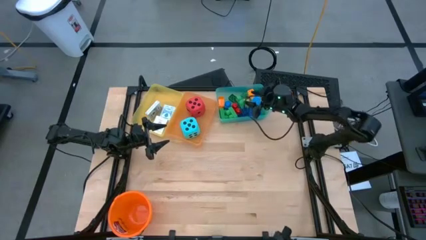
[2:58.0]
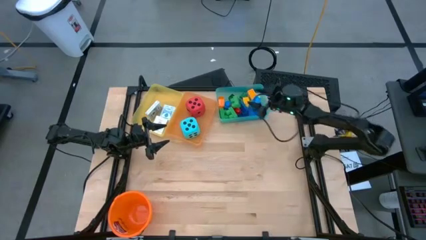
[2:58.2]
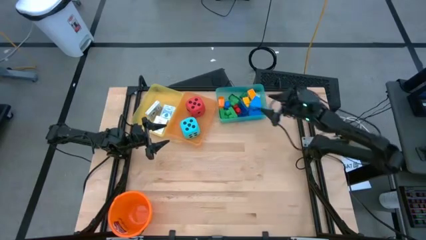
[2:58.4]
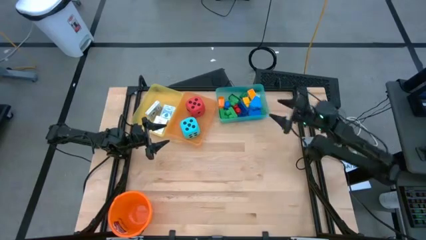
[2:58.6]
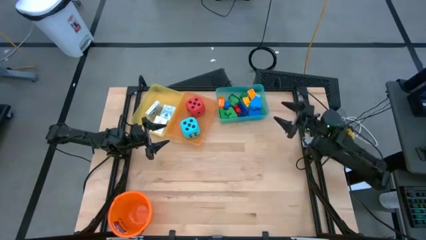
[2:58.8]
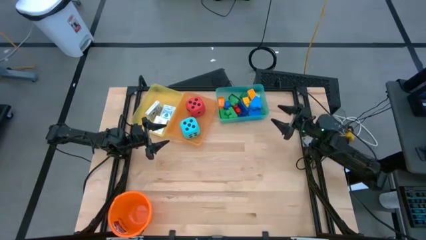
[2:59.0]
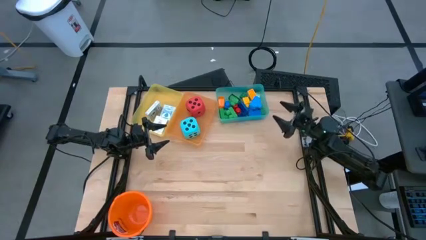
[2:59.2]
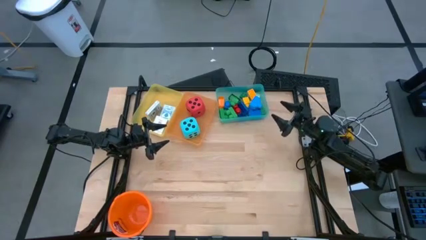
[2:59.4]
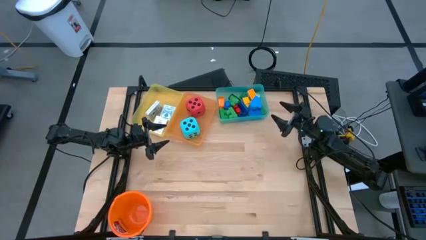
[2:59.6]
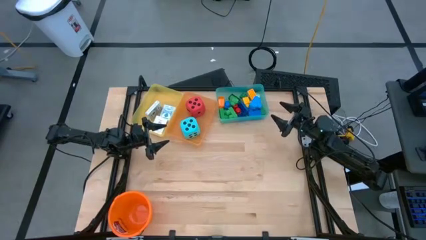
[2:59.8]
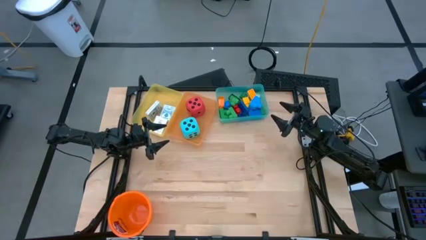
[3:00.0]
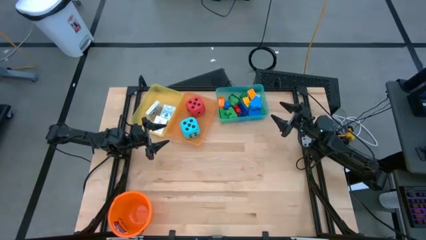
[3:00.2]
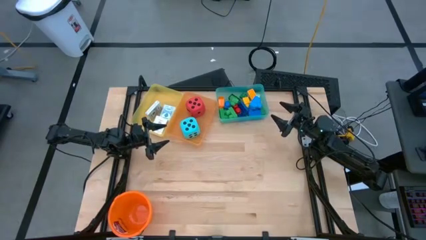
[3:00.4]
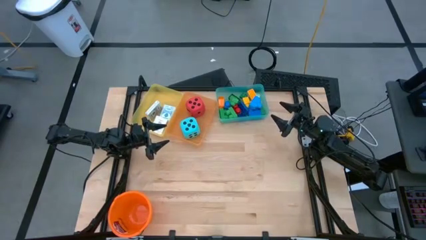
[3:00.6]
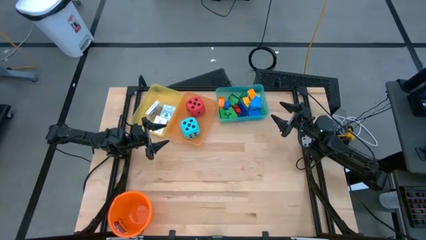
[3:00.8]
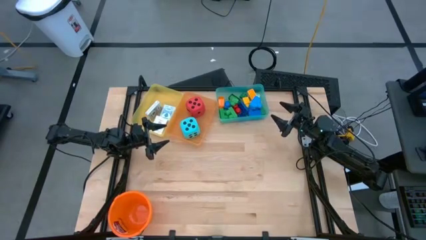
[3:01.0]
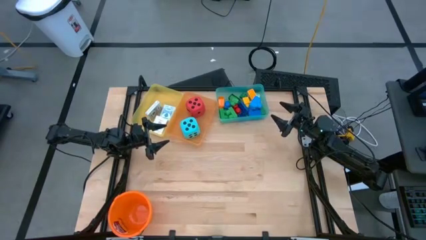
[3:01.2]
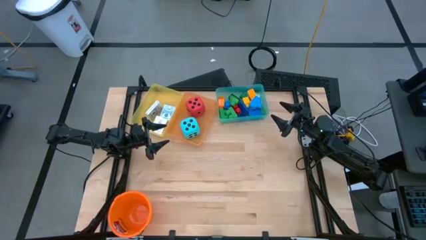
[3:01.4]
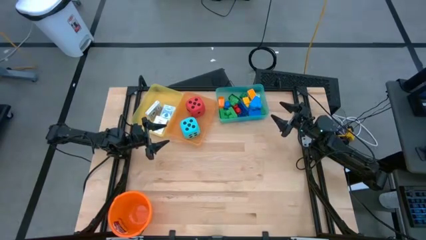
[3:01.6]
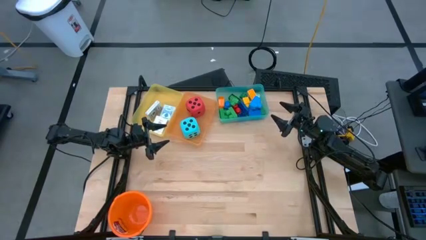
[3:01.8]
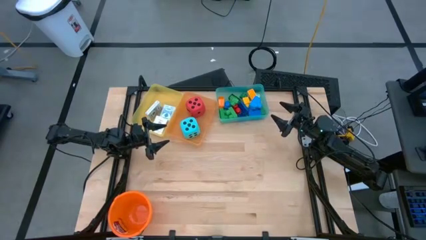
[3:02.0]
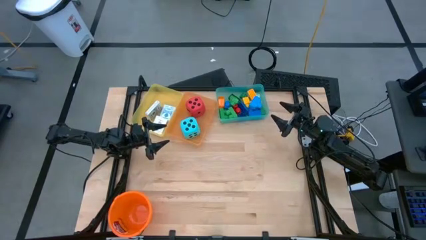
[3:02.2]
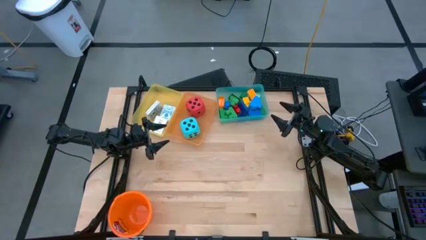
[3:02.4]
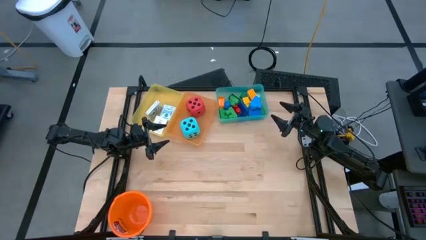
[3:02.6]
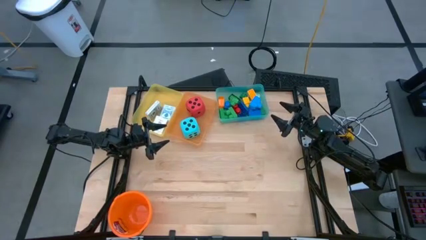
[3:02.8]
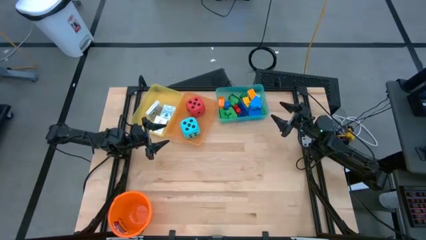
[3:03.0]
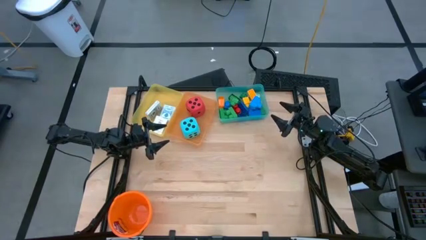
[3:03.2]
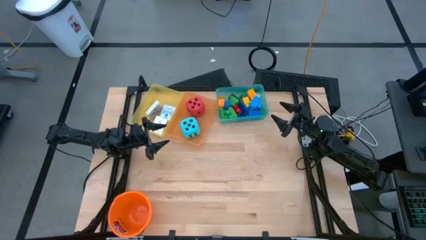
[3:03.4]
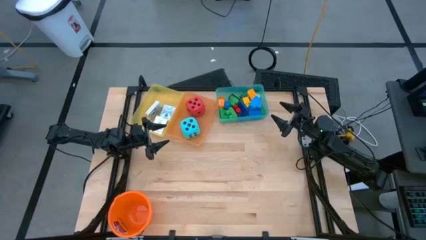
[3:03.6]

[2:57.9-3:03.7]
Task: Pick & Place Toys
Return to Home Position

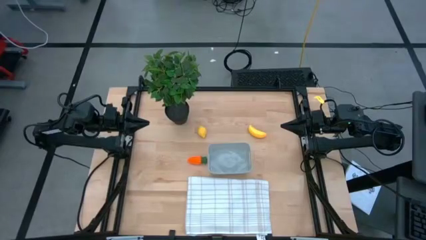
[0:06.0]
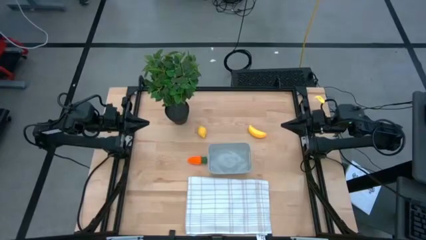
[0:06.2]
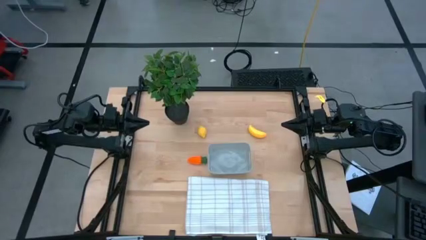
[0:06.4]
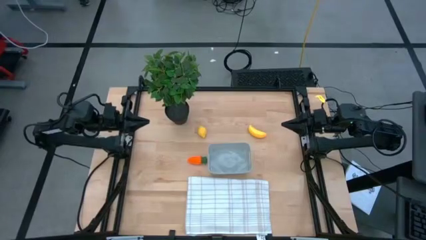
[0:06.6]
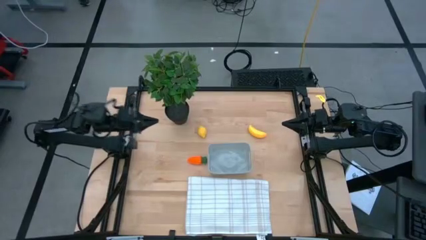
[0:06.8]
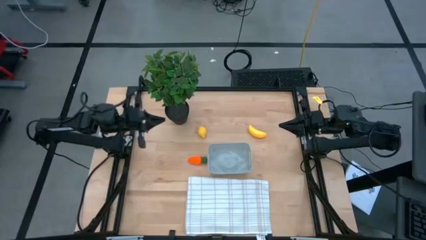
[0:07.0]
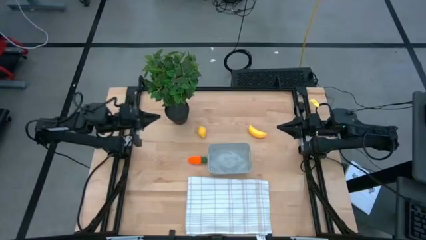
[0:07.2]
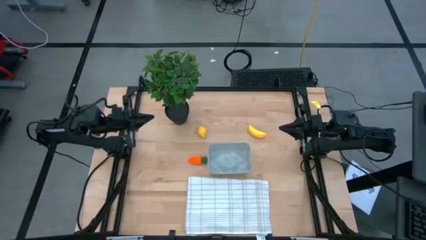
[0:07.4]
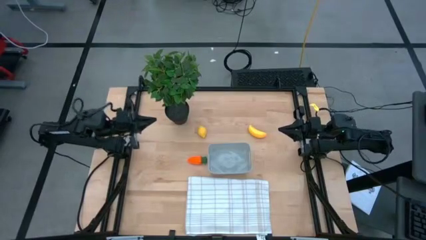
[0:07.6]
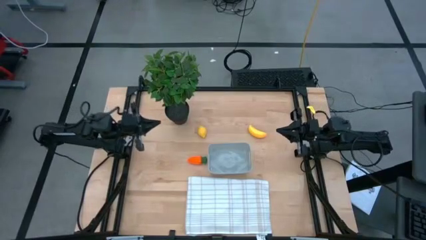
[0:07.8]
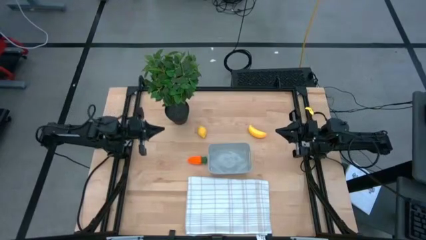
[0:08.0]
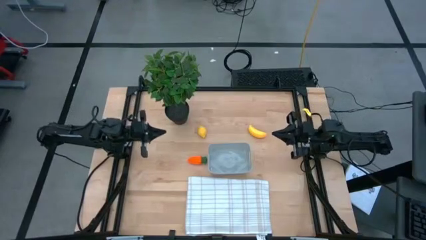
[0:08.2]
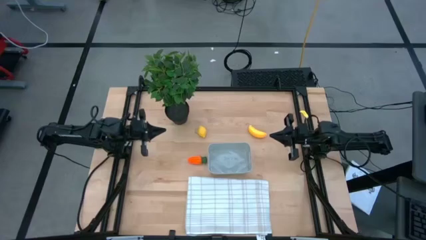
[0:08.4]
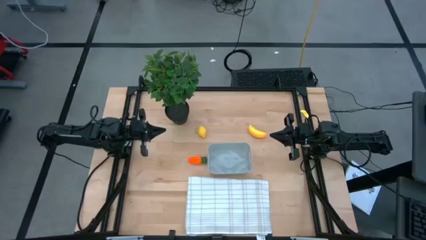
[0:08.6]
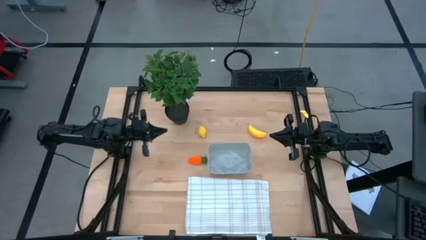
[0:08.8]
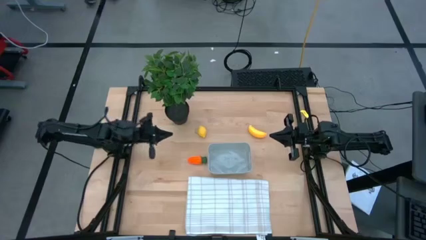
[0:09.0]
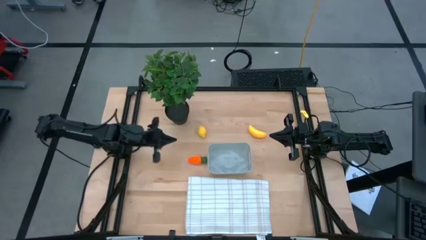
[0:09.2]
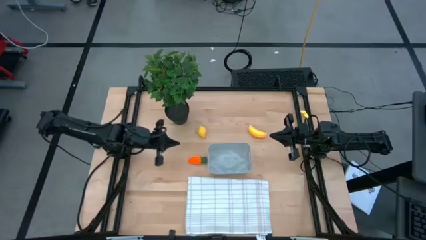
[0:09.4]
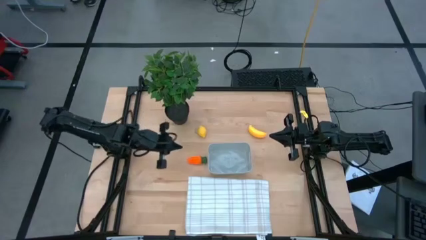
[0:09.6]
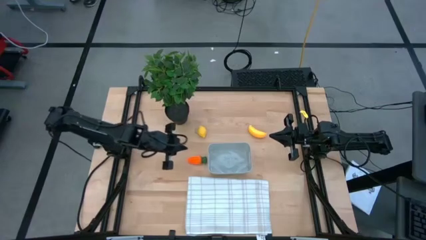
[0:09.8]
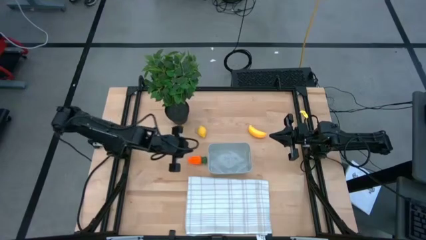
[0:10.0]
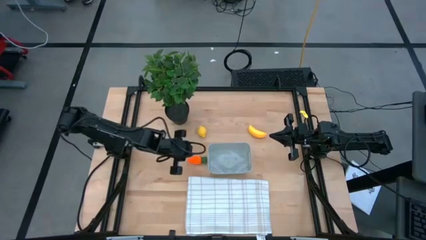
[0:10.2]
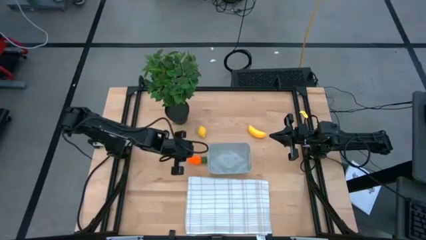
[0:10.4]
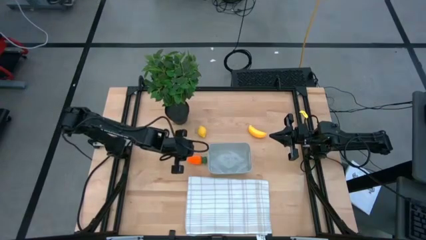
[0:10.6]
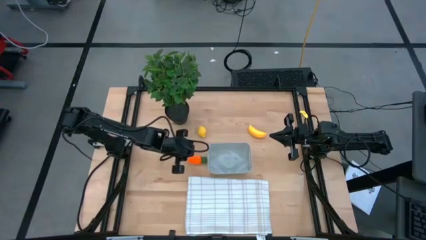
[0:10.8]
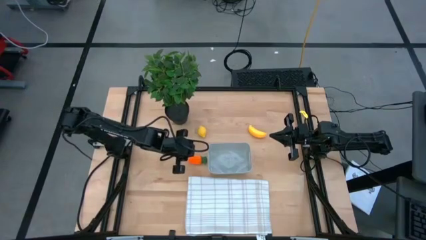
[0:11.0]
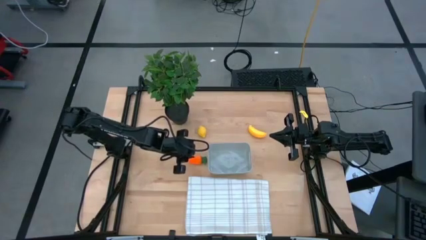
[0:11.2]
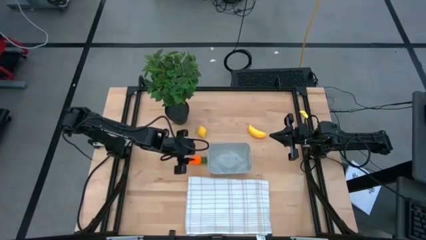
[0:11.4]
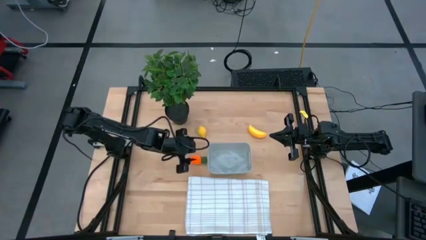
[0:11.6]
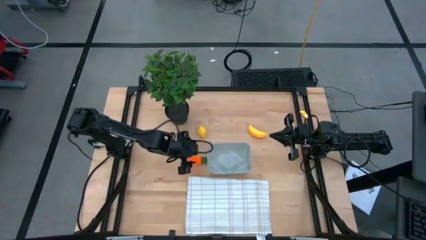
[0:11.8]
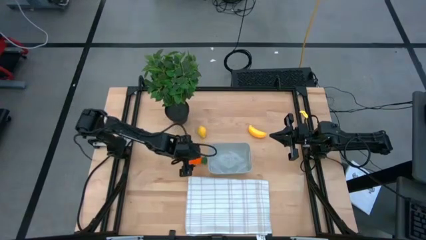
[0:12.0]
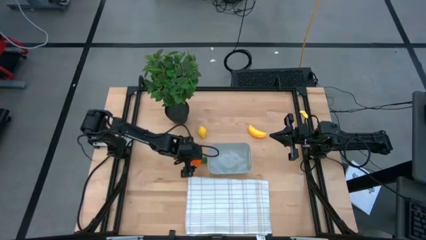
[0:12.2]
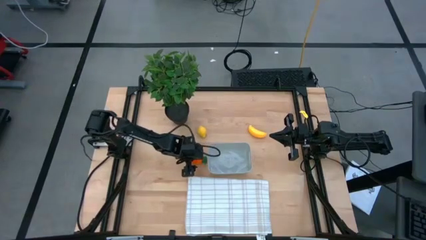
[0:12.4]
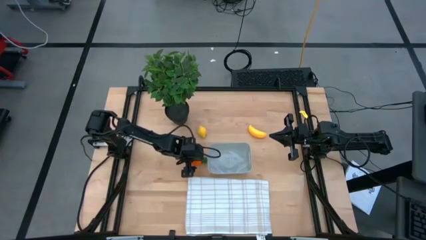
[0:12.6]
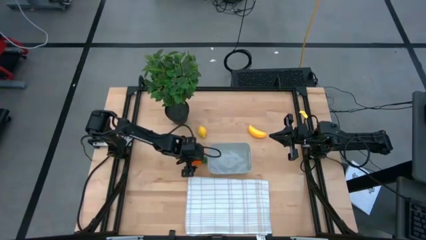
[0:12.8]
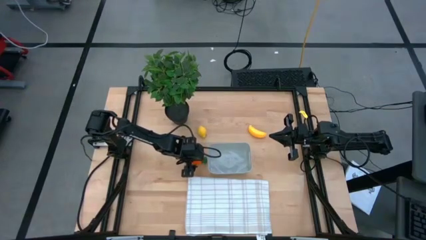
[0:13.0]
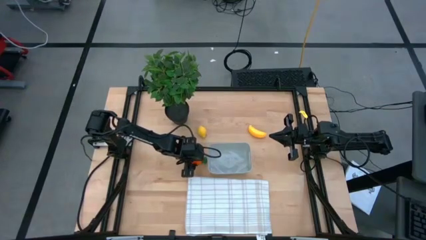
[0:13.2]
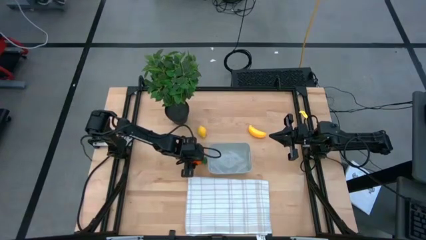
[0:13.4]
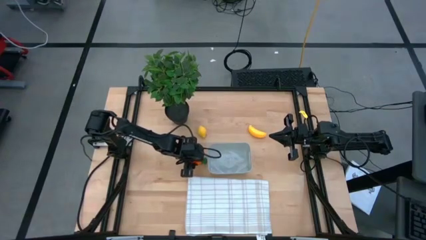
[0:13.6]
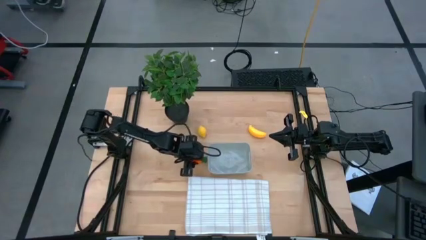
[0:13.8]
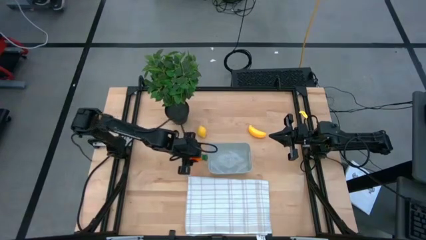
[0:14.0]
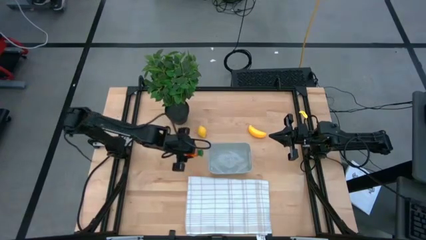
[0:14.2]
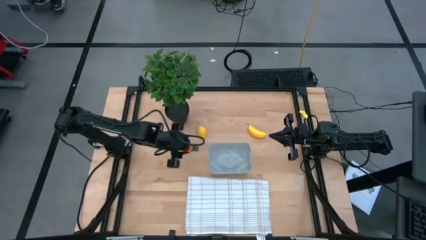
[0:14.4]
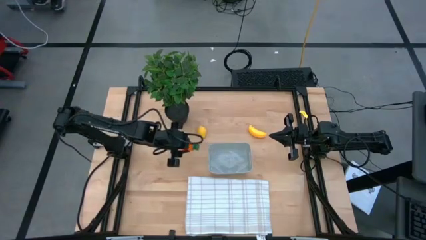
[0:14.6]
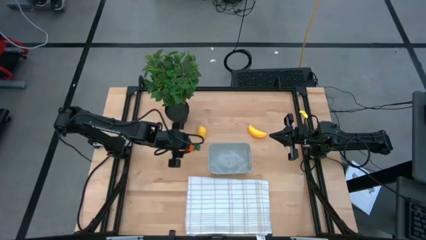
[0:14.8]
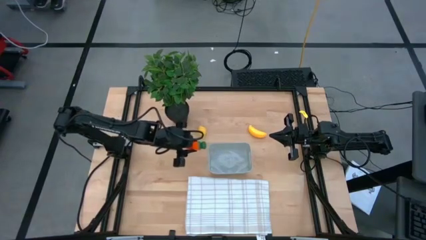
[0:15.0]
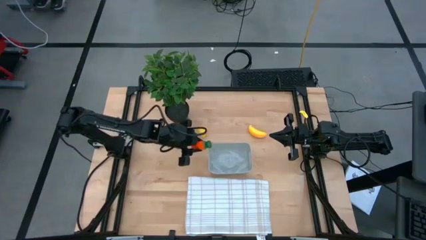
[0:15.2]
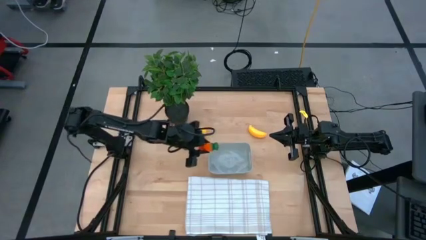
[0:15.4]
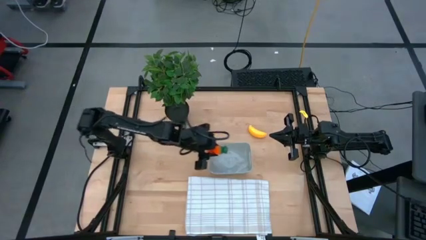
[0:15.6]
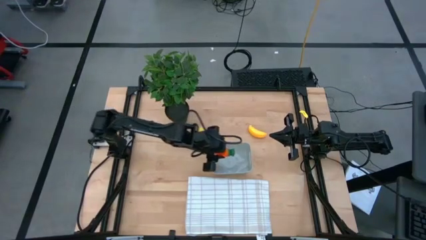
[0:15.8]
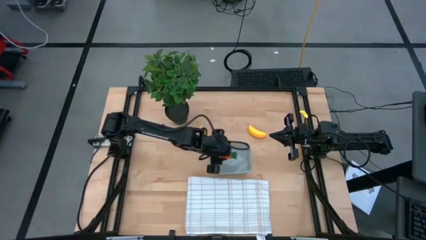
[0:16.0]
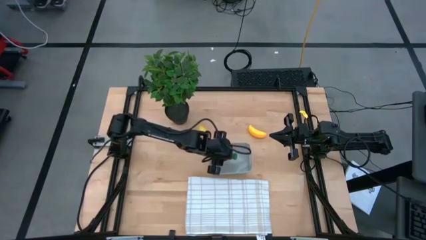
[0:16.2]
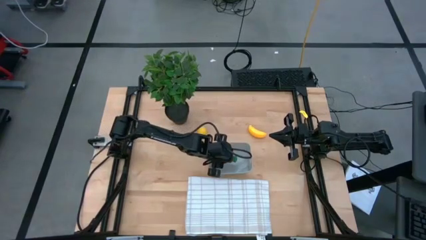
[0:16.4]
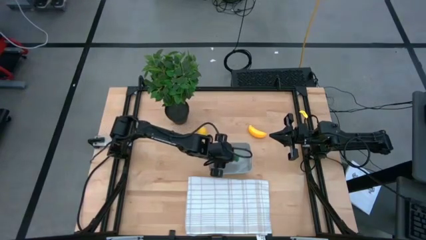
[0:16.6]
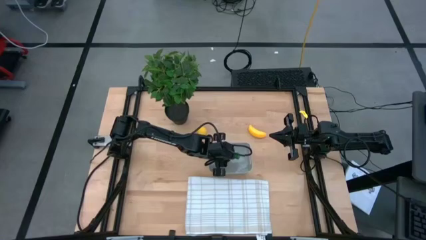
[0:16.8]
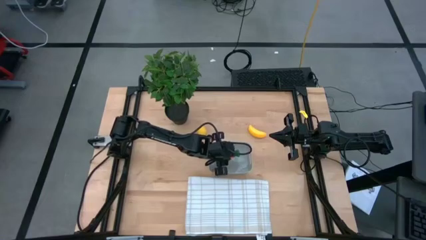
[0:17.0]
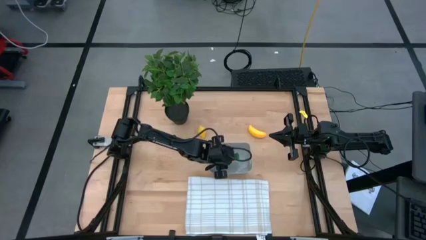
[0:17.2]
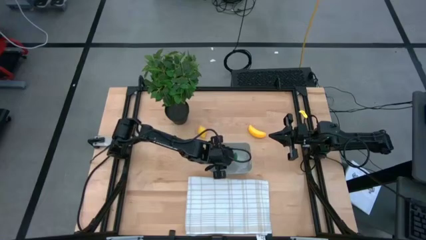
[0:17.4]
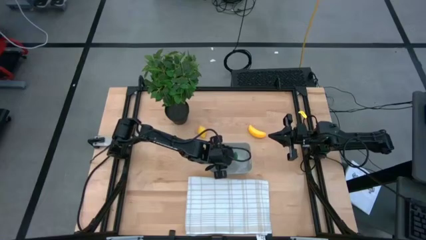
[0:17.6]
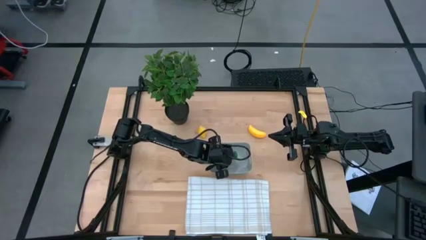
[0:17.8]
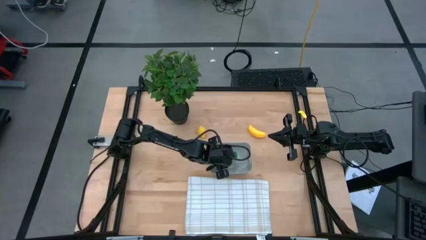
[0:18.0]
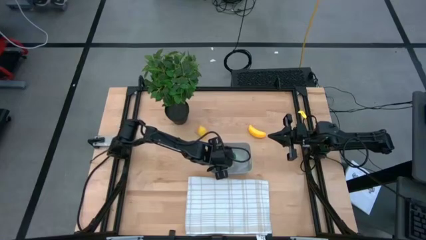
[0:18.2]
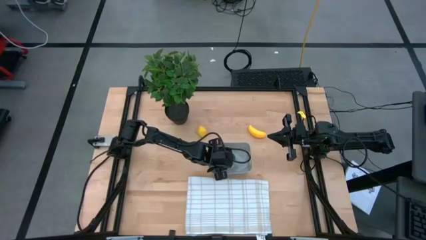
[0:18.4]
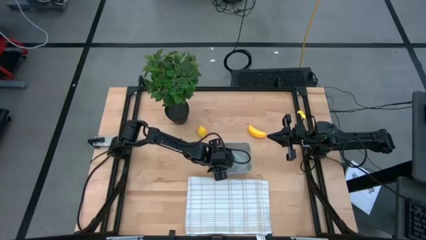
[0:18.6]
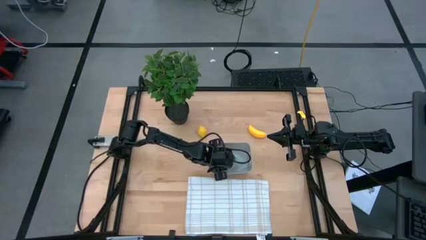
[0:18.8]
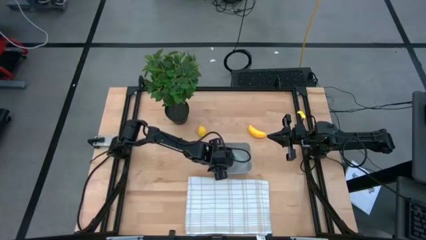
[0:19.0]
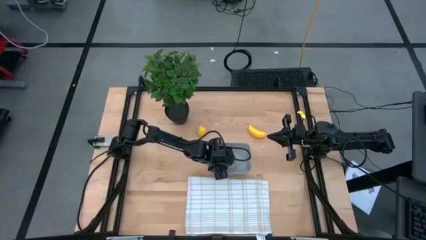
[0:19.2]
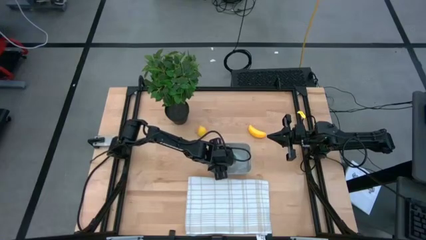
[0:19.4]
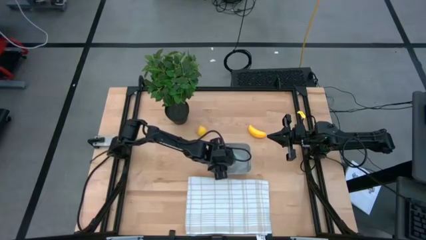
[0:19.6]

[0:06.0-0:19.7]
Task: Pick and placing Produce into tupperware
Put the carrot into the gray bin
